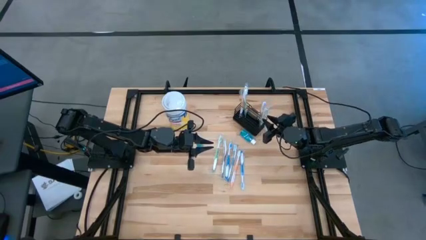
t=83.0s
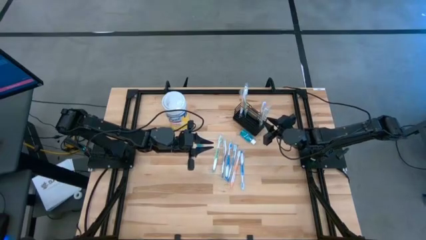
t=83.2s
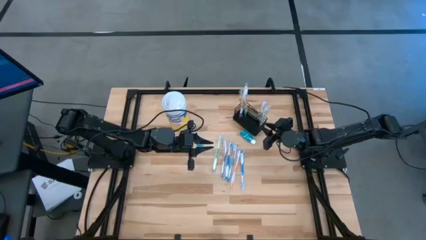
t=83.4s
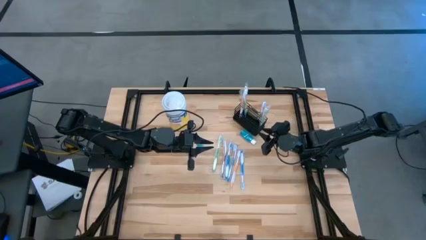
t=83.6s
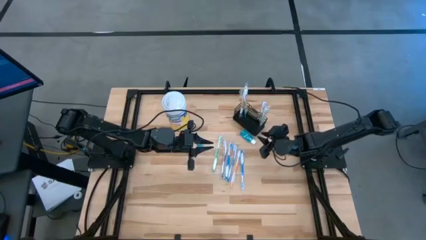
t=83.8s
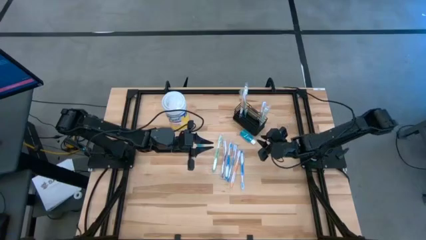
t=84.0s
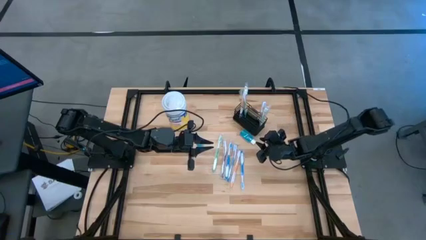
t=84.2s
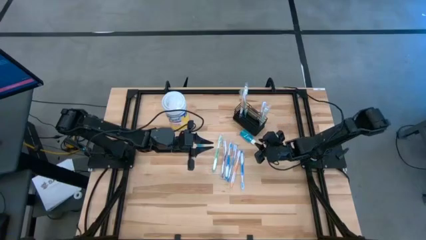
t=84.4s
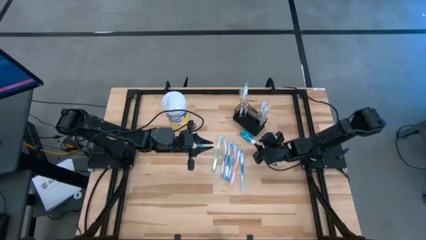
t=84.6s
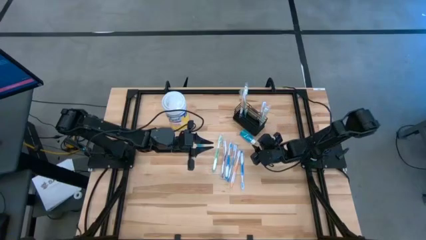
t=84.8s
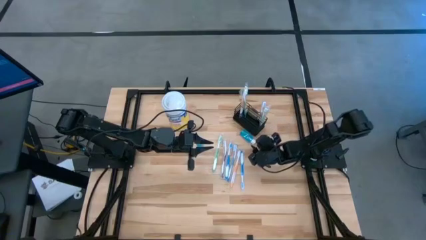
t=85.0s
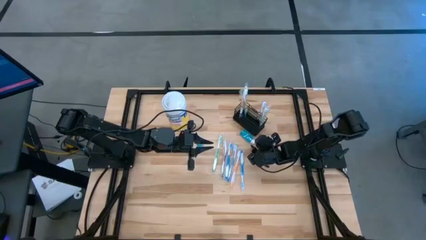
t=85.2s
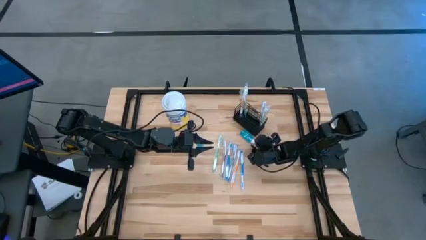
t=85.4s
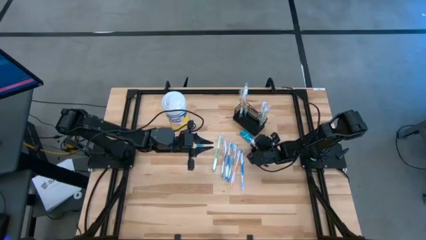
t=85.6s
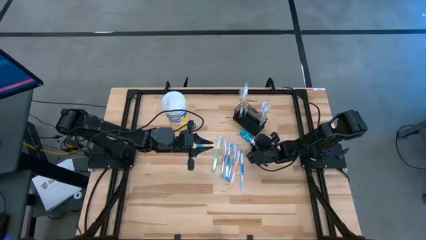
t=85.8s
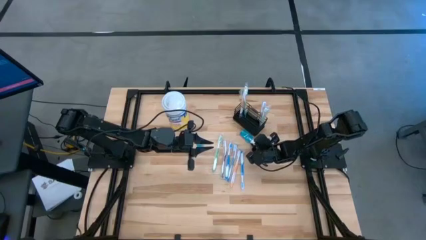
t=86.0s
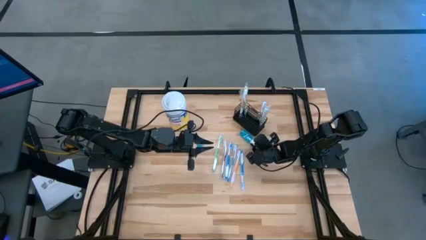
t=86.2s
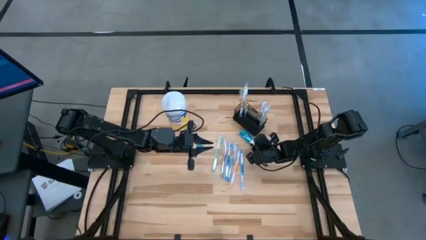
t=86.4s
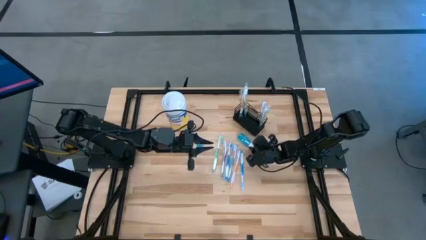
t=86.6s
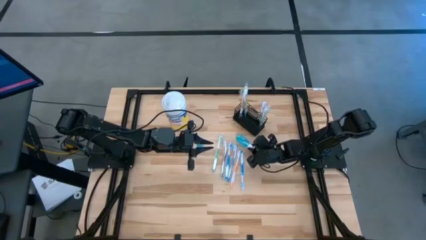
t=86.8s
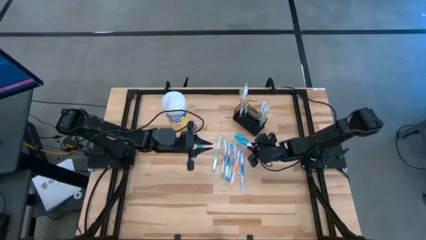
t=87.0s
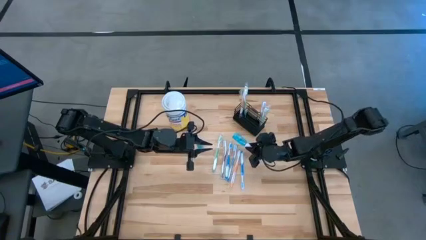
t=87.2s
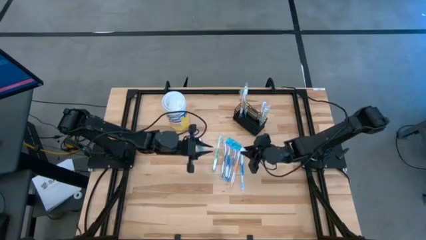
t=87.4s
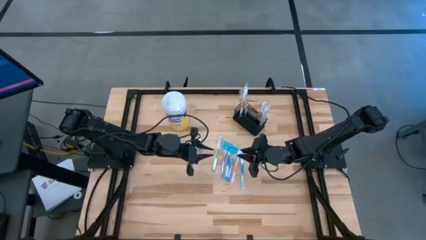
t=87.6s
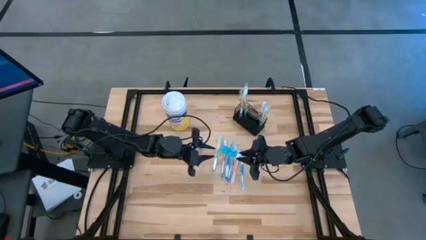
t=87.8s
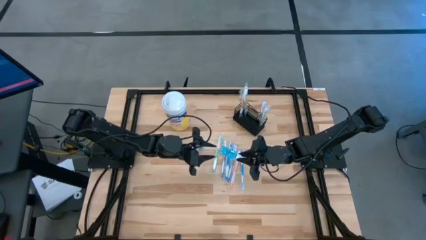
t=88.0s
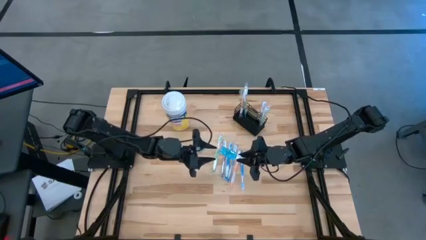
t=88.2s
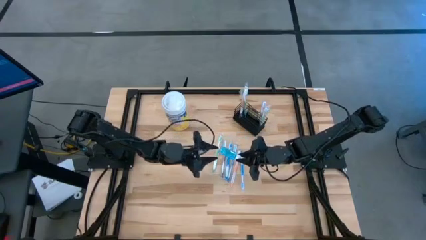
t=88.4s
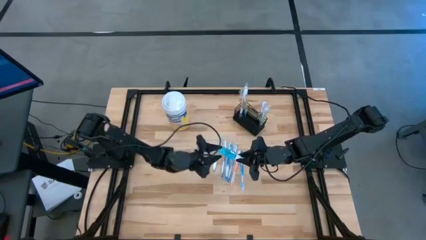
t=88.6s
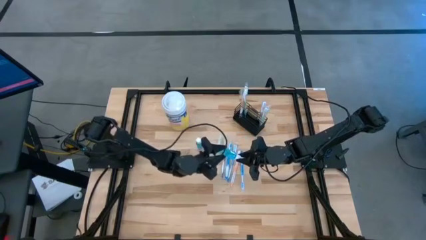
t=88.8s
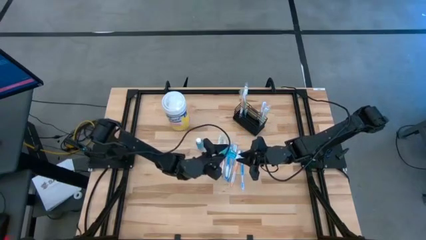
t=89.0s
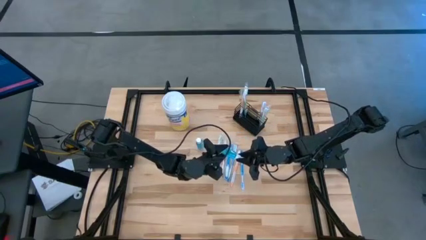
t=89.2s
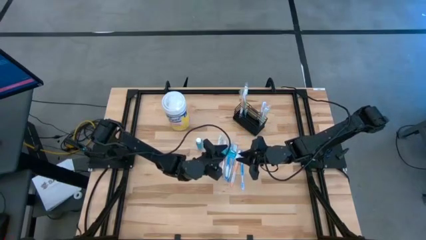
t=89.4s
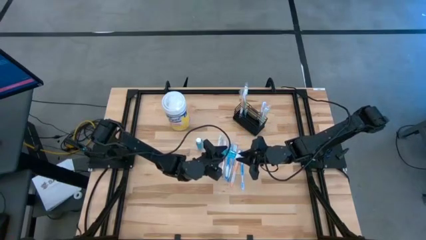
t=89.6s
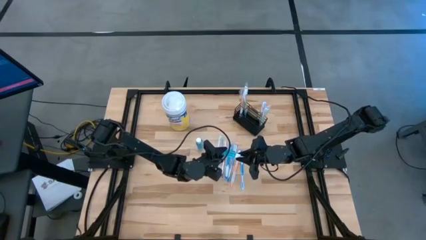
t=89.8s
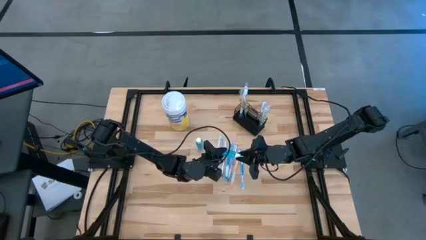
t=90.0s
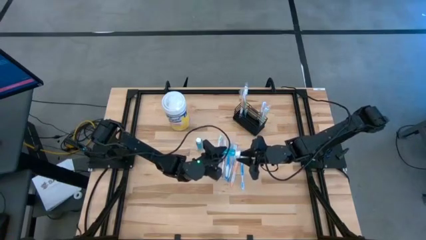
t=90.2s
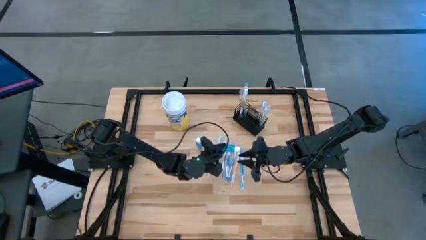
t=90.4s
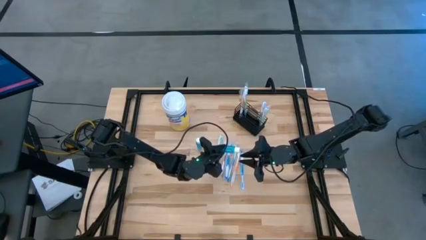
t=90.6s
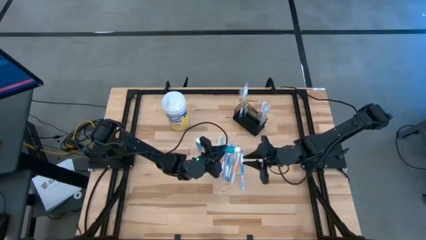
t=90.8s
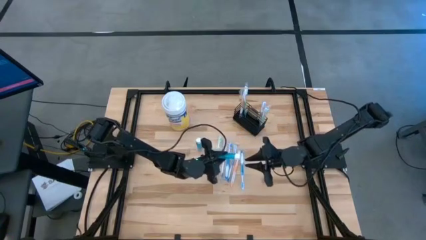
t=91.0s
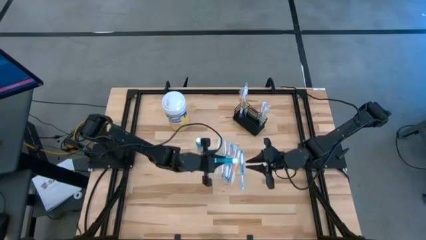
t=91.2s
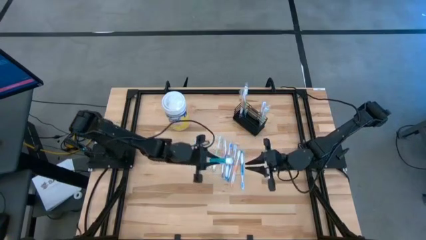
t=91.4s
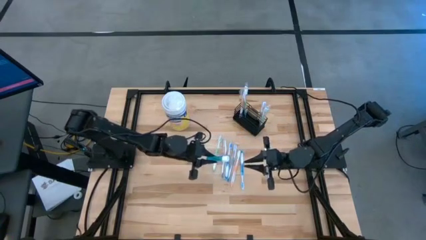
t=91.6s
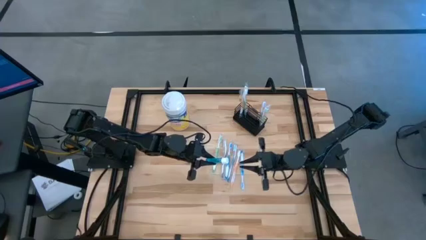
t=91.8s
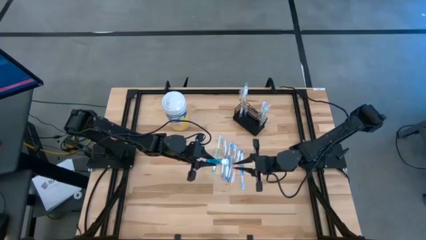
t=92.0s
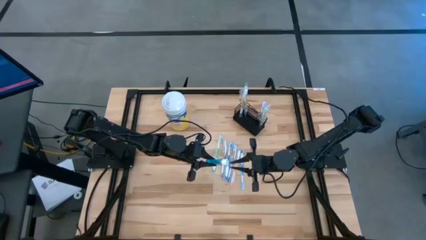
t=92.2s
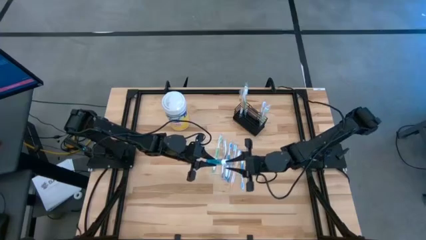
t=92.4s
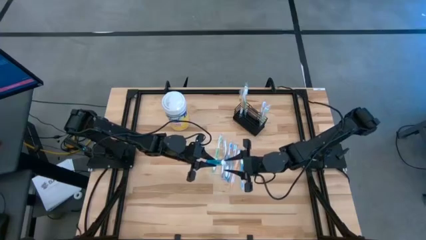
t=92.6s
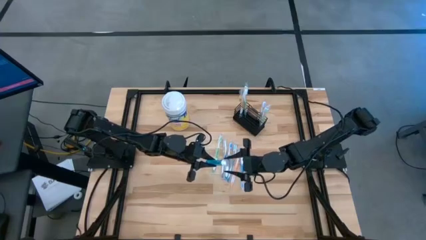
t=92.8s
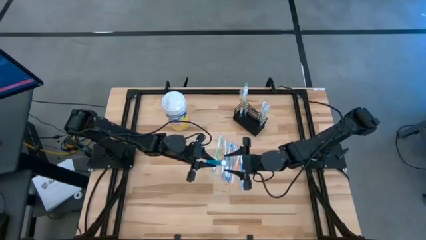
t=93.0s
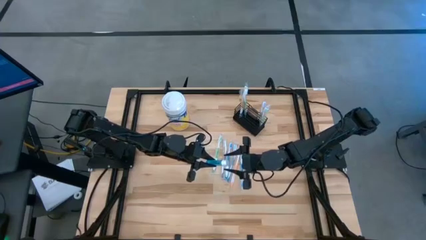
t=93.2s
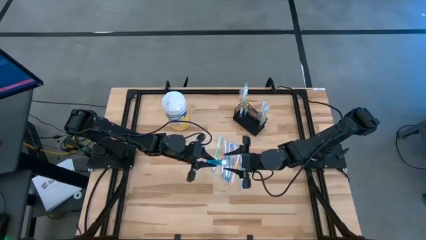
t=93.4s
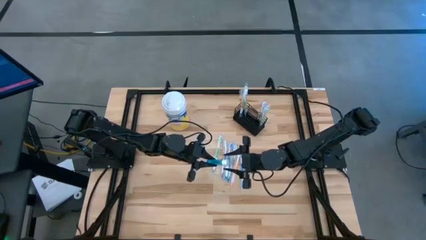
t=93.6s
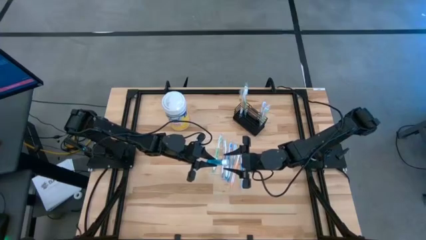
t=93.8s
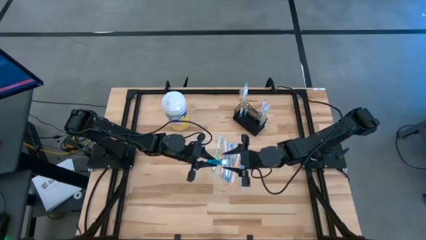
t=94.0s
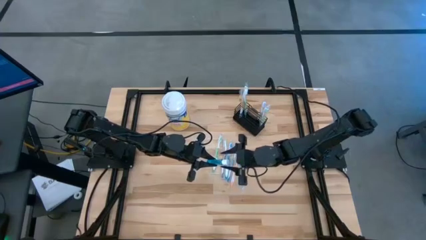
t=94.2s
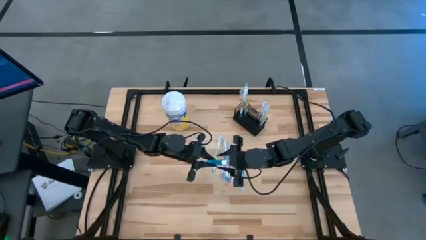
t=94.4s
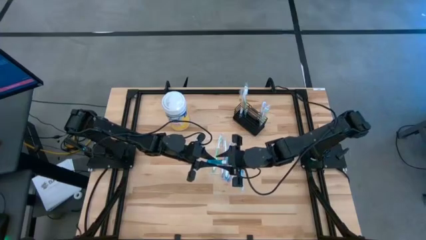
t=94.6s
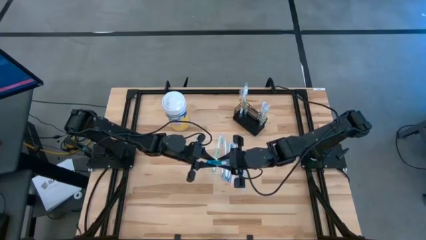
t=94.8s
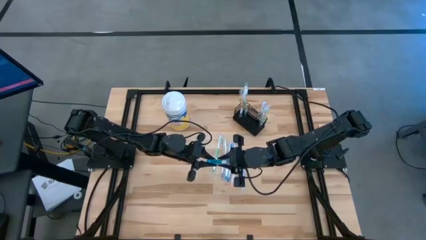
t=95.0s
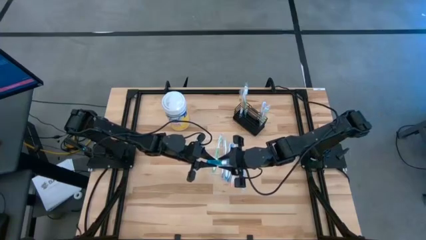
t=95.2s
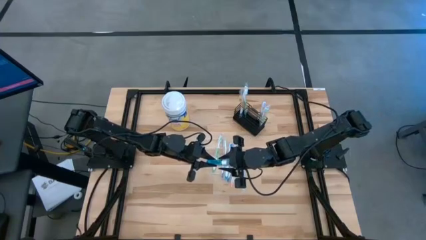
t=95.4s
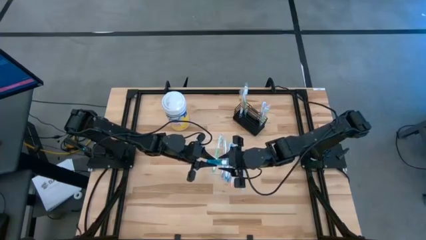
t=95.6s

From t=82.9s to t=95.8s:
Task: Pick & Place toothbrushing station
Put the right blue mouthwash into the black wire organizer

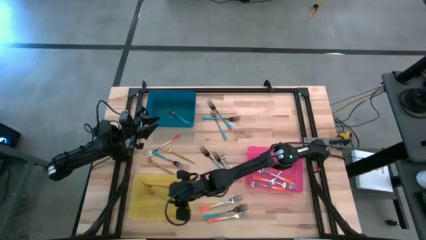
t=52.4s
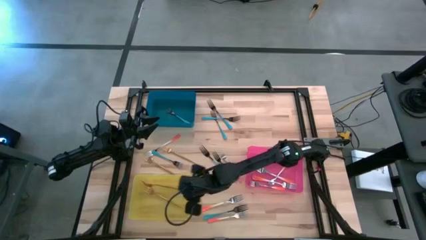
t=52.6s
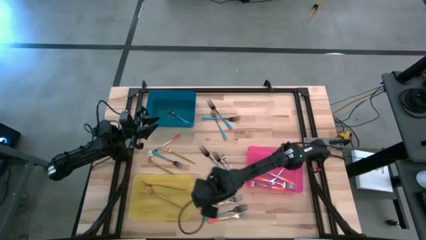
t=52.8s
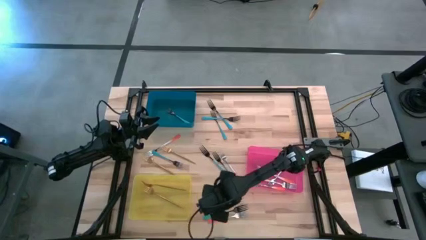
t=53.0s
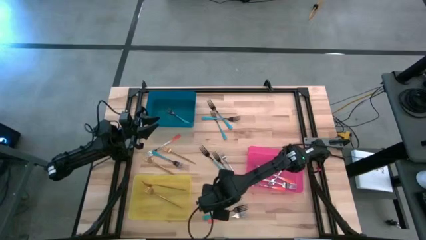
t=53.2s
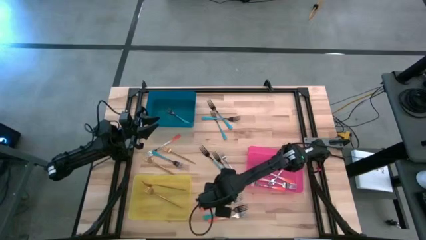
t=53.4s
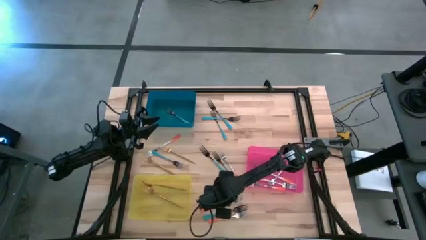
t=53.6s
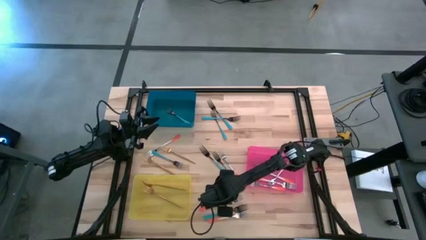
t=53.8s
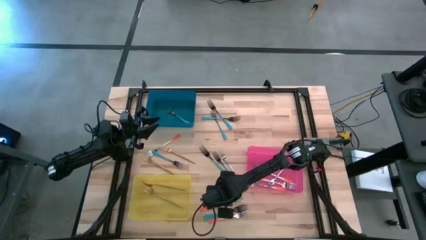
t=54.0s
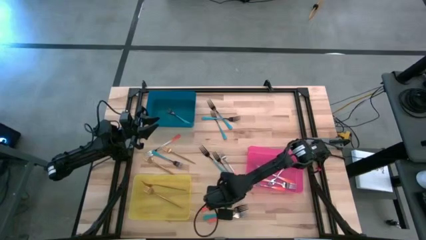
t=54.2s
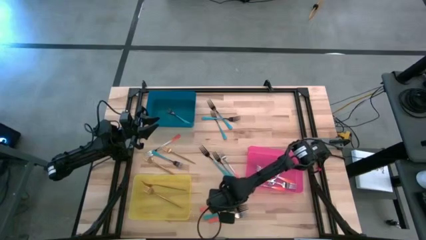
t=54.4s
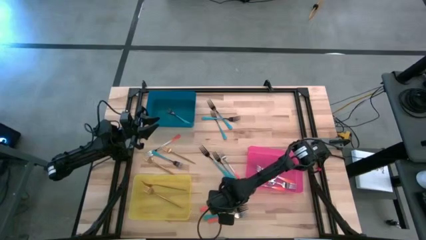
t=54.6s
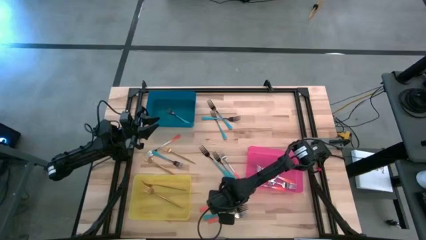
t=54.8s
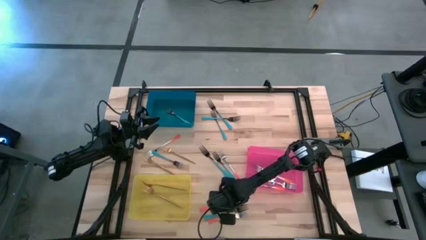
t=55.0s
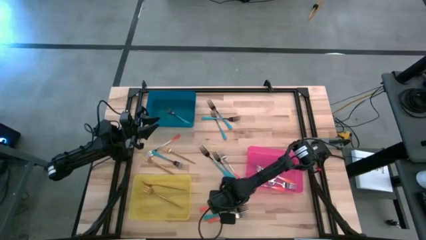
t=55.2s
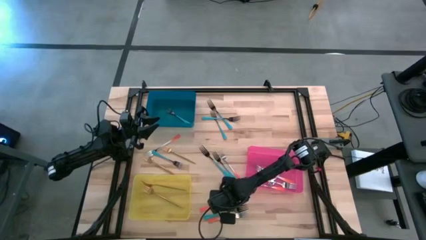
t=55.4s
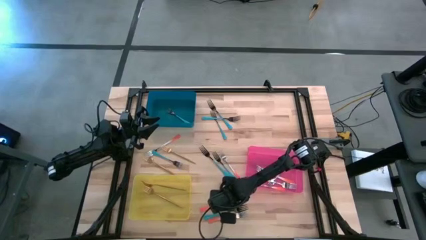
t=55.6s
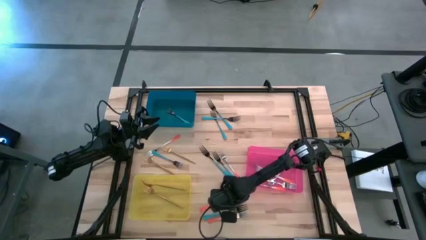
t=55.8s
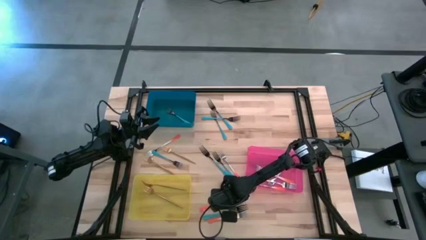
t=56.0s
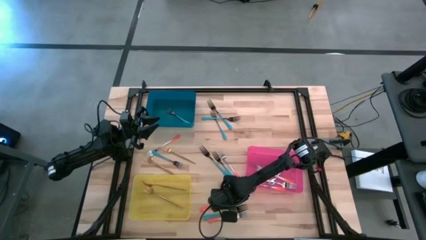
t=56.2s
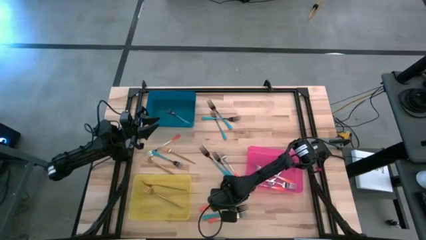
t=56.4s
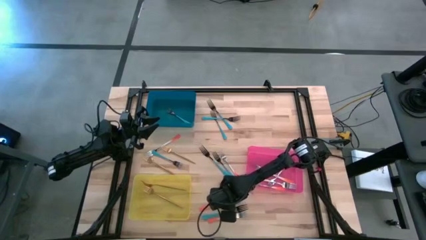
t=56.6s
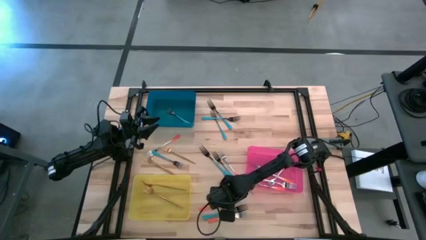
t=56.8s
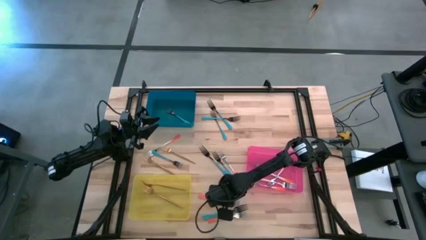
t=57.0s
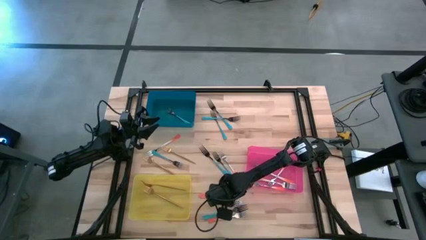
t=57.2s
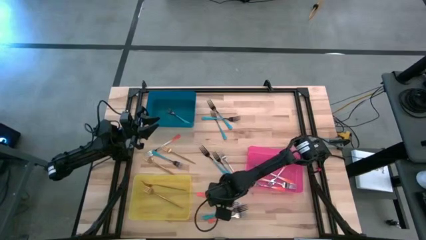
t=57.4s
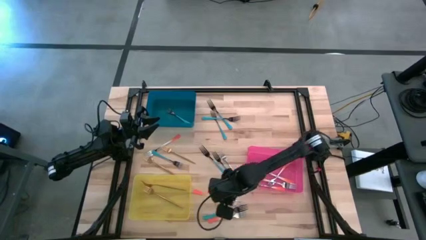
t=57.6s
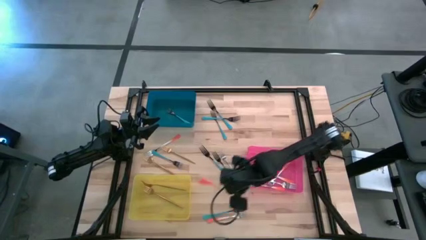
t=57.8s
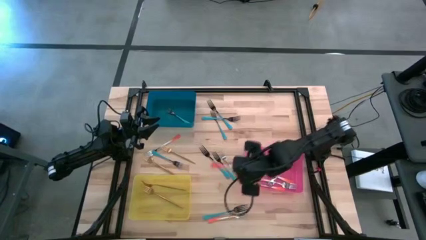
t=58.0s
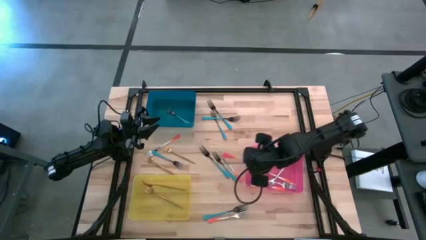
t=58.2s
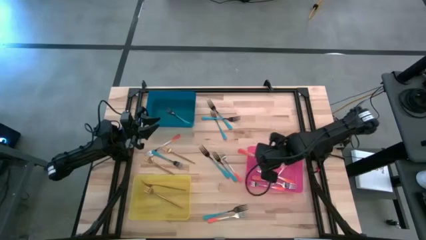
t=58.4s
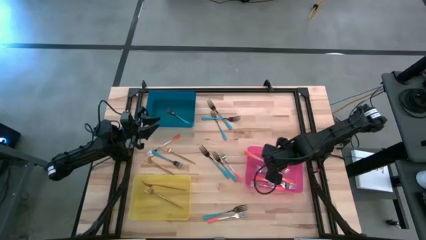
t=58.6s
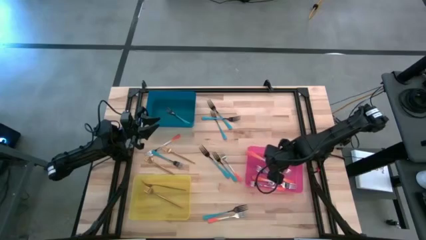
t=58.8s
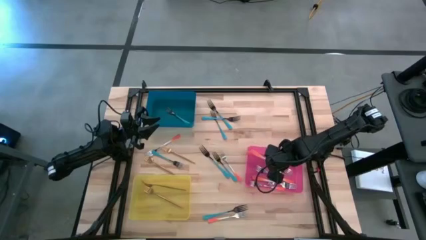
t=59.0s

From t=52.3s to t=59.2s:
Task: Sort silverware by color (type)
Put the orange fork into the red bin
